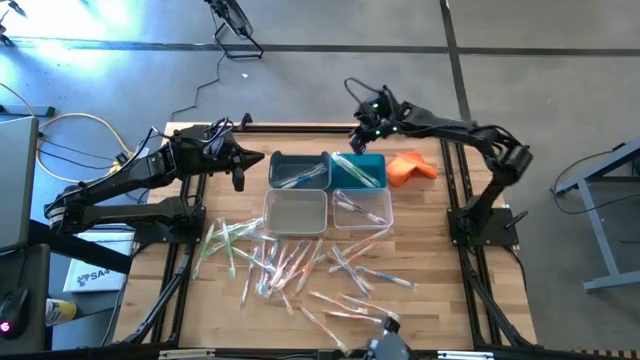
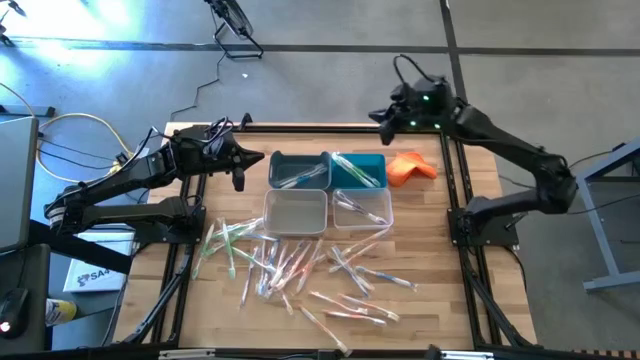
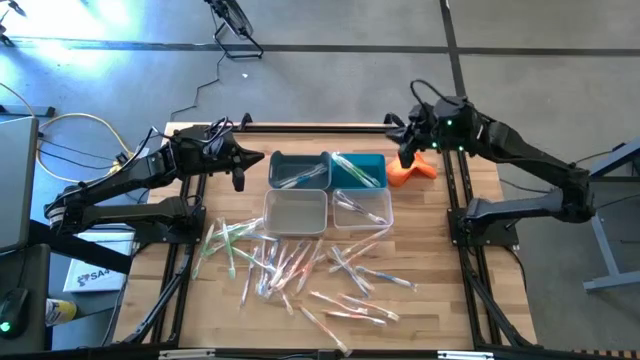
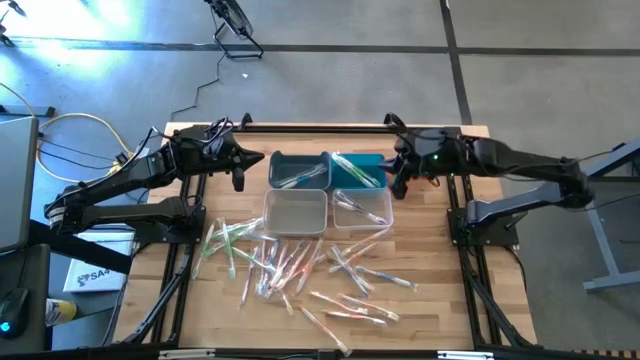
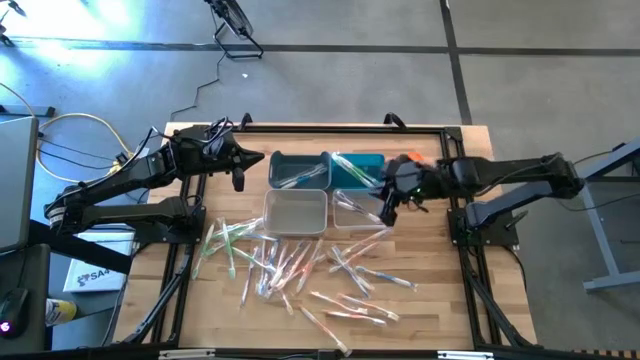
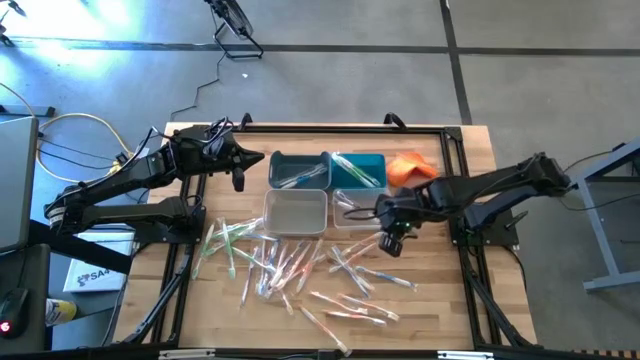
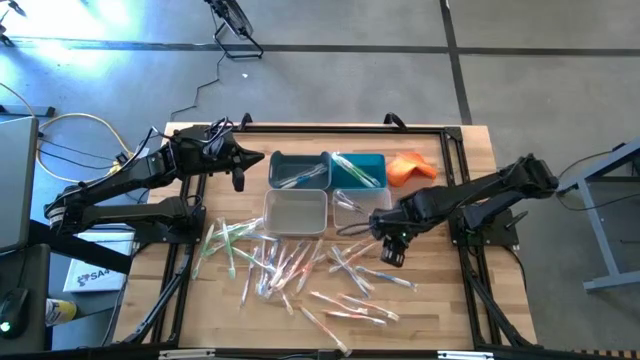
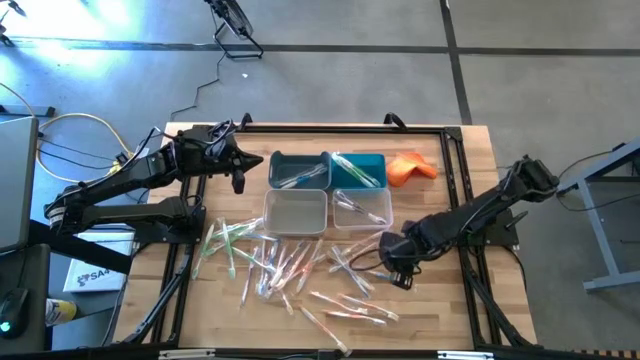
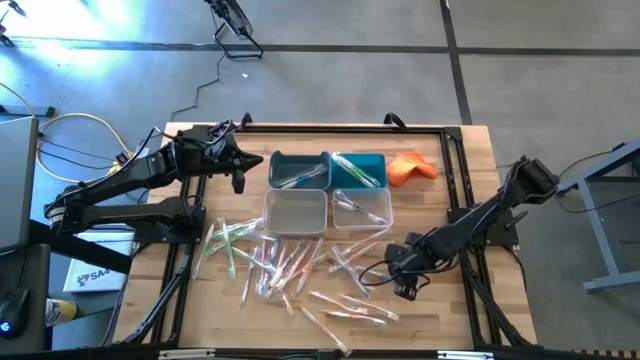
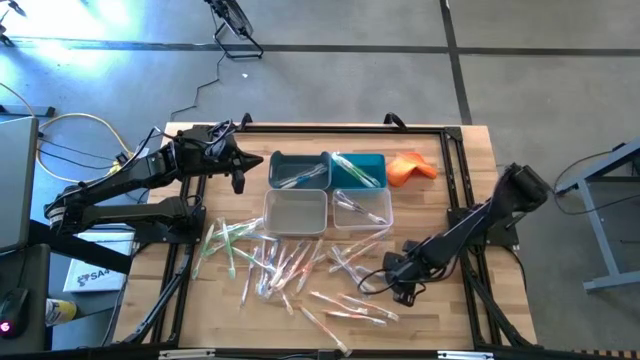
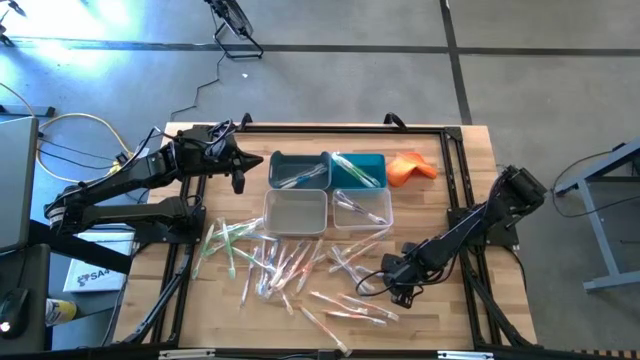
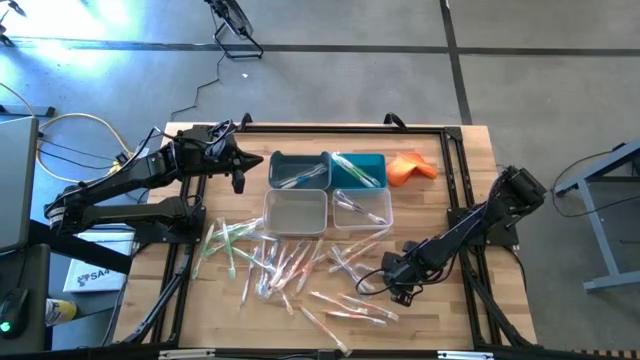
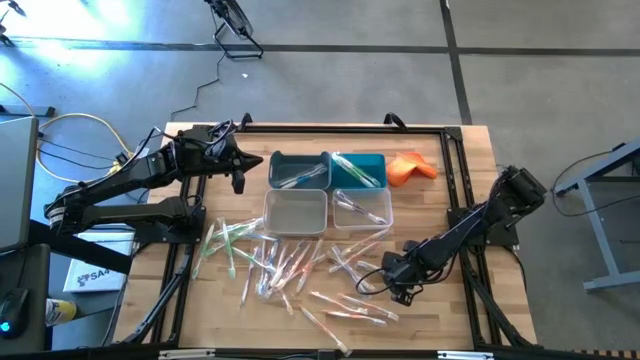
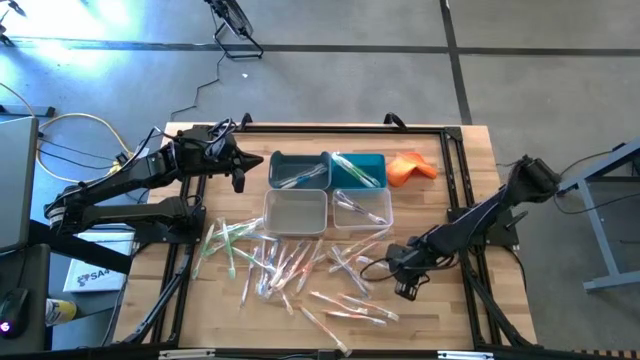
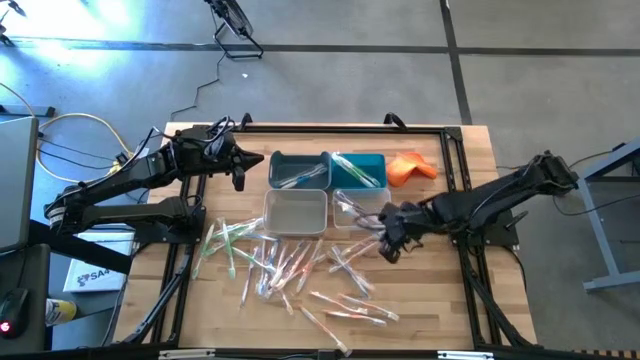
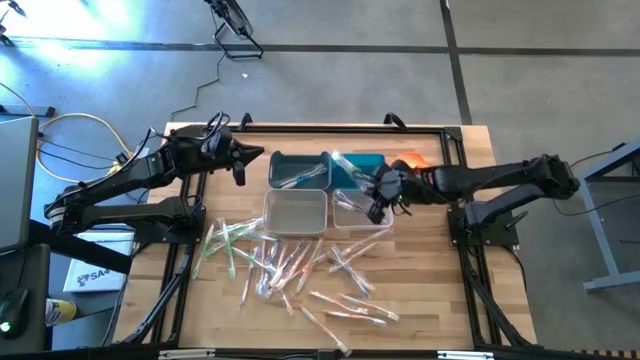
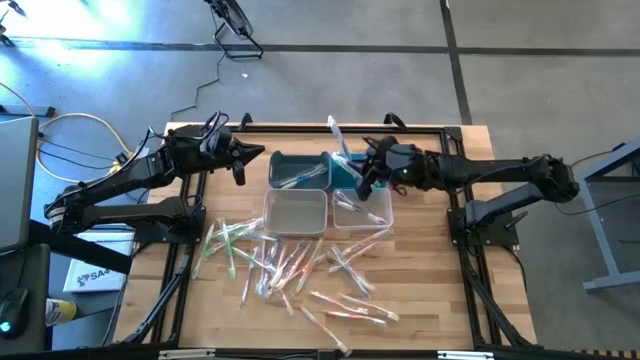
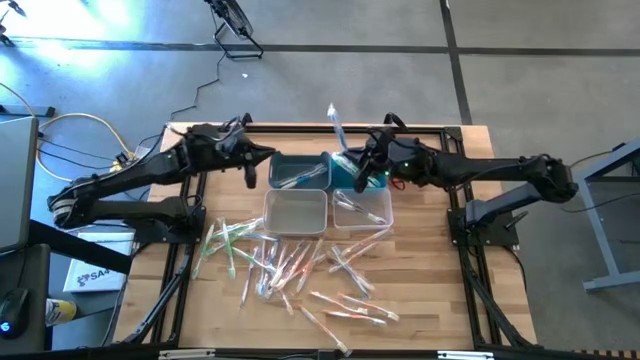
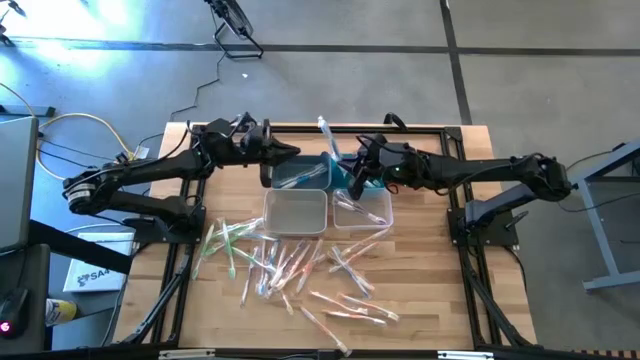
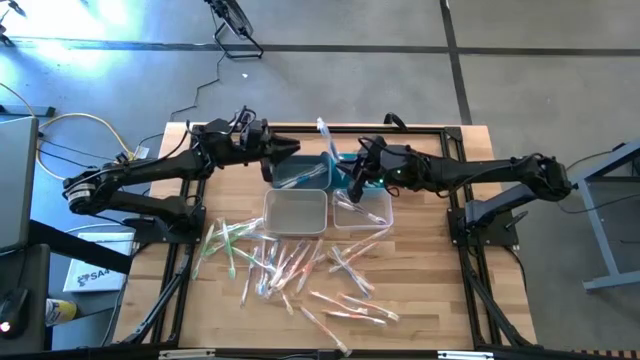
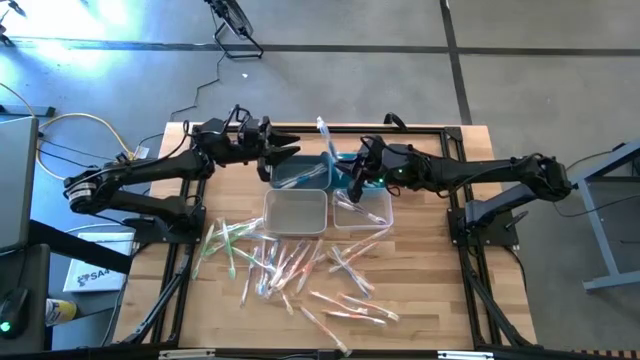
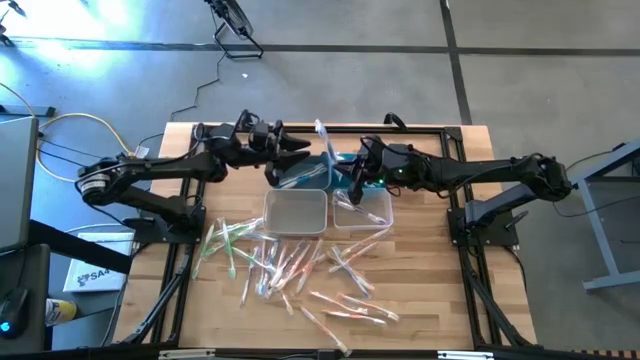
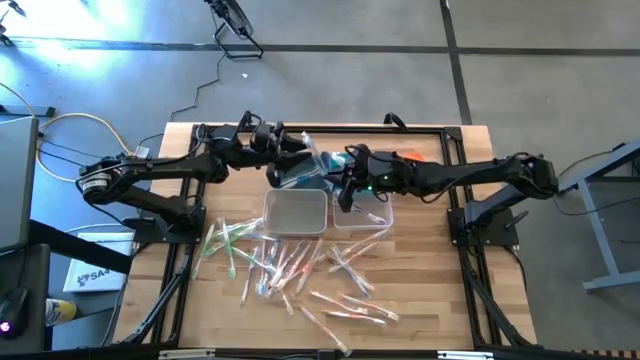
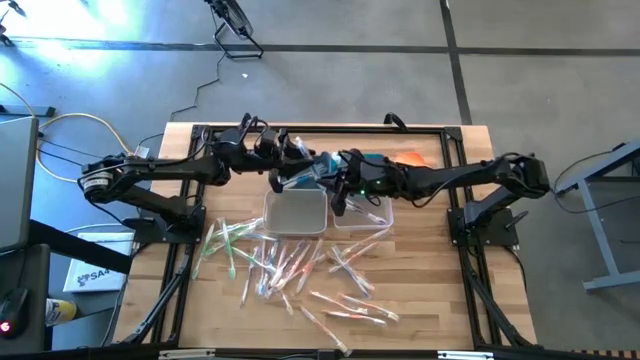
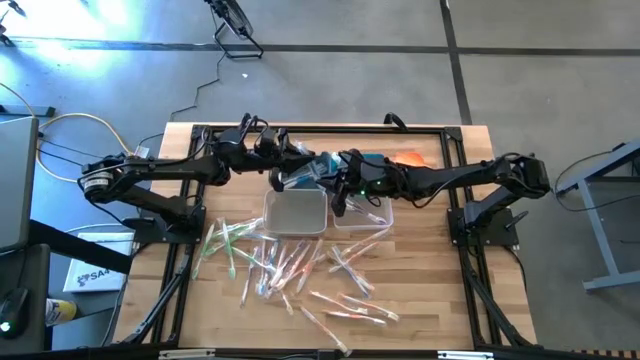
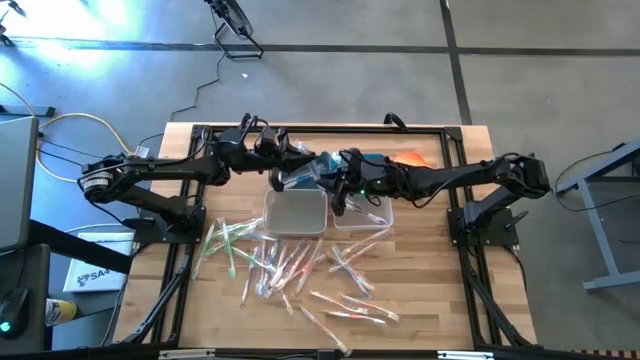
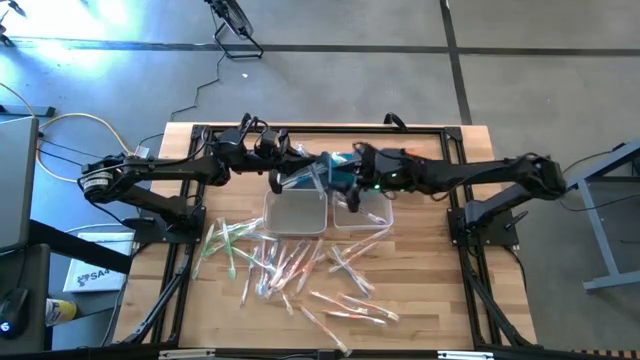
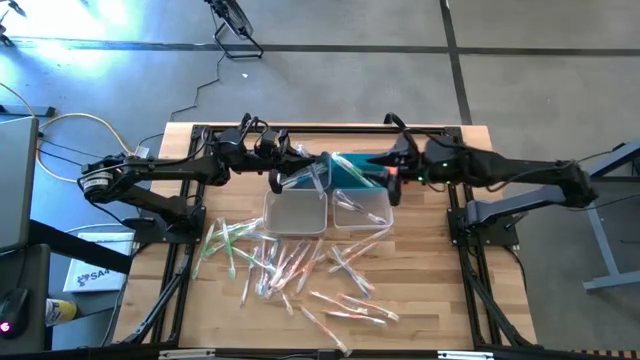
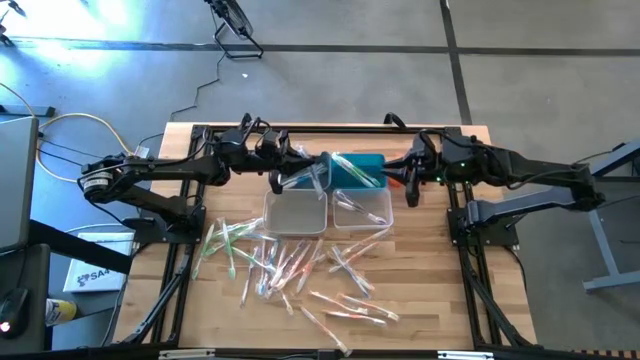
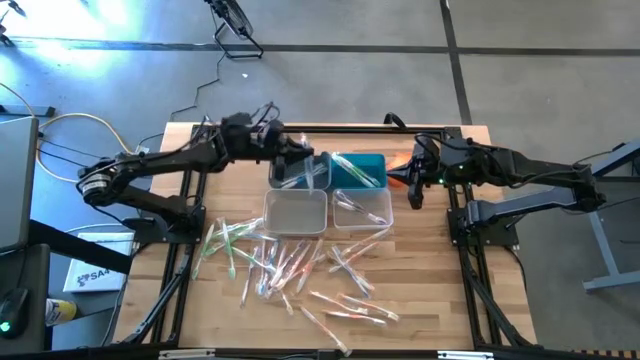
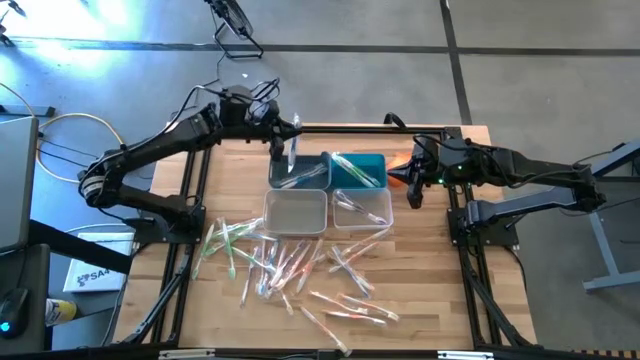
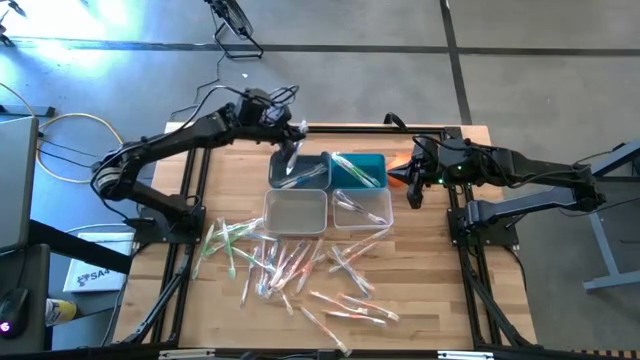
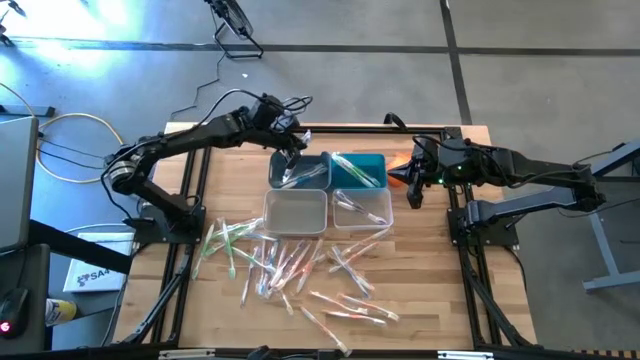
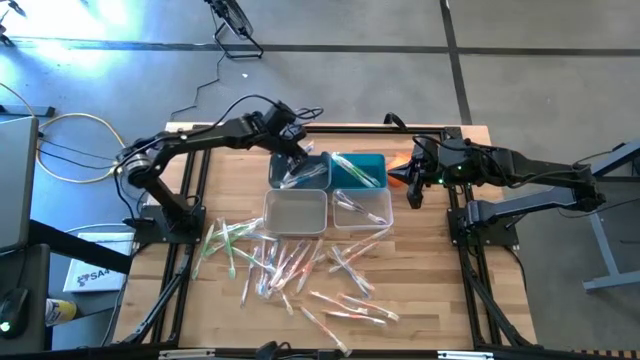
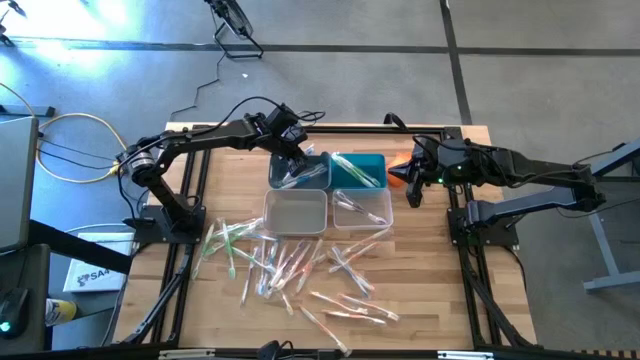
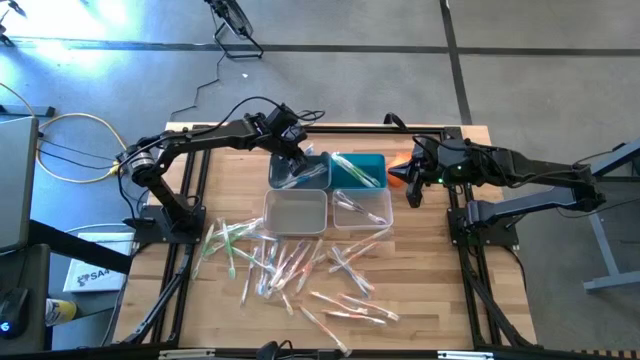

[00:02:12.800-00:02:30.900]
Task: Pick & Place Toothbrushes
Put the blue toothbrush into the dark blue bin

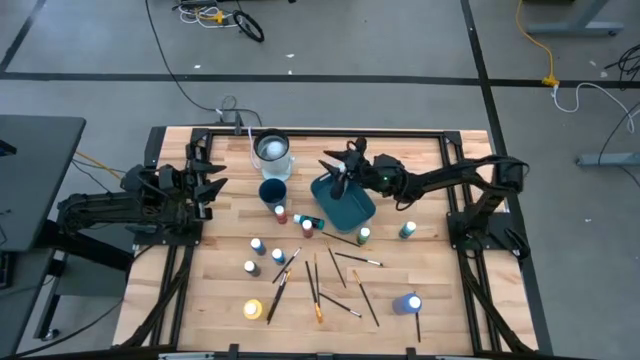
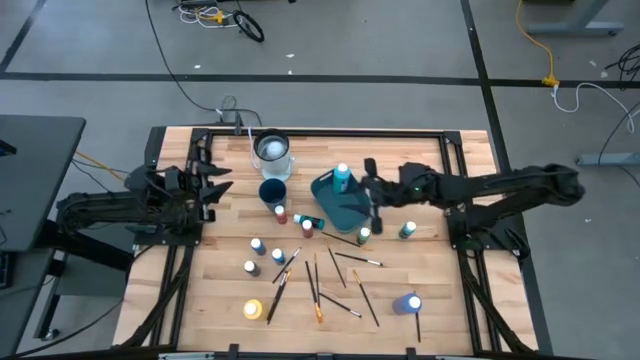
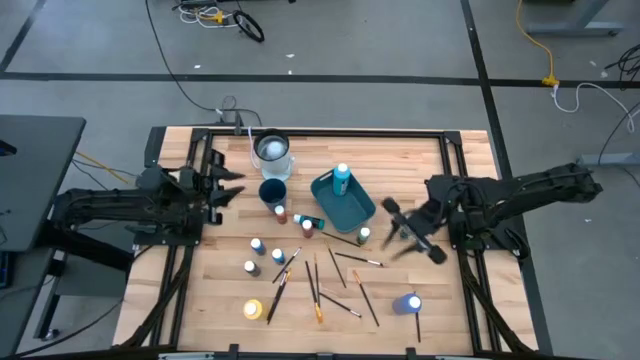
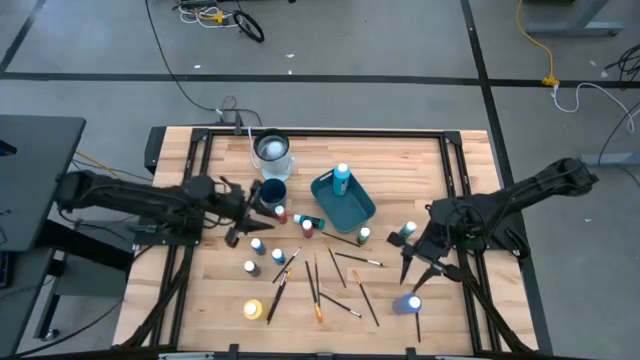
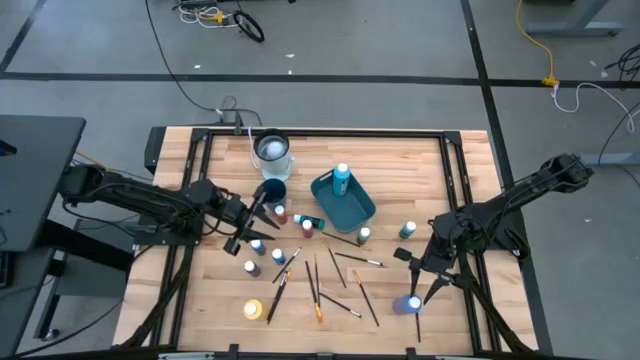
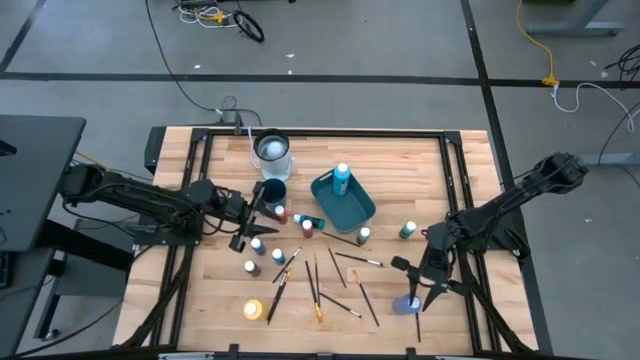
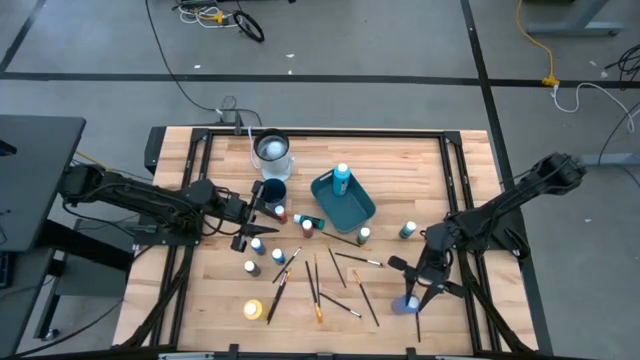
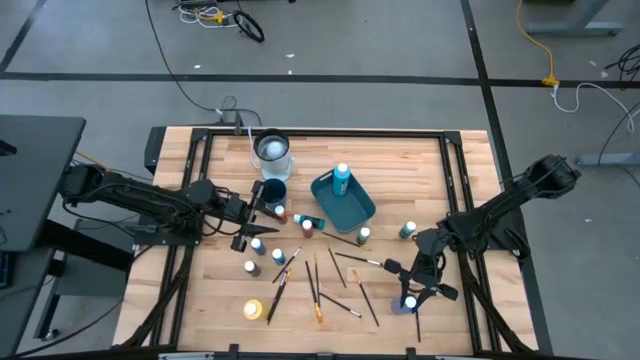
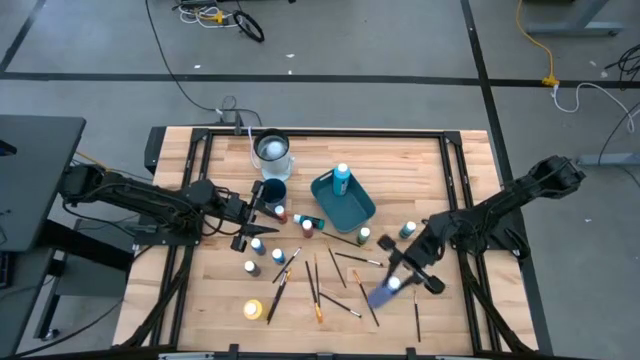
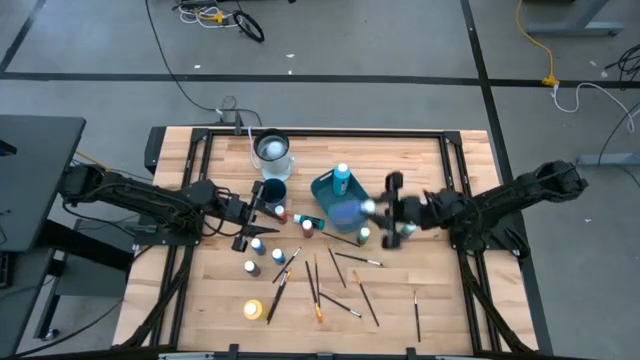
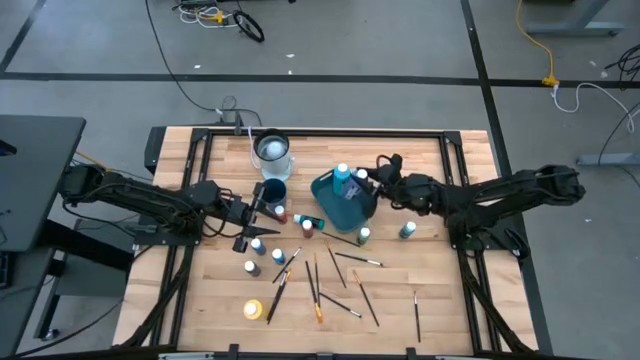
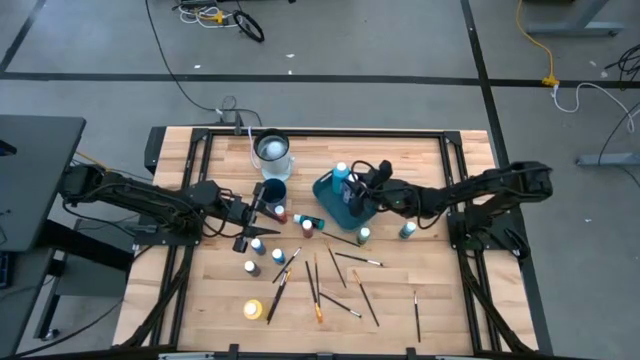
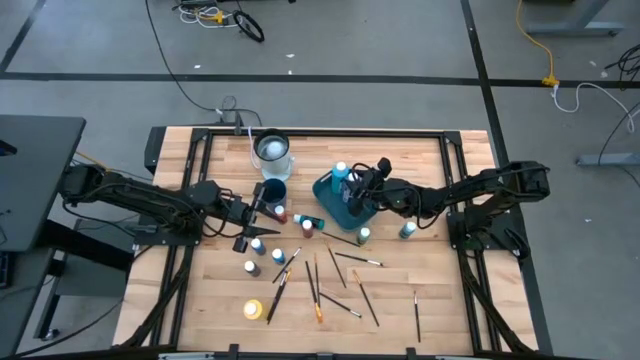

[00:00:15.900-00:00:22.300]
Task: Pick & Place Paint Supplies
Put the large violet paint bottle into the blue bin
